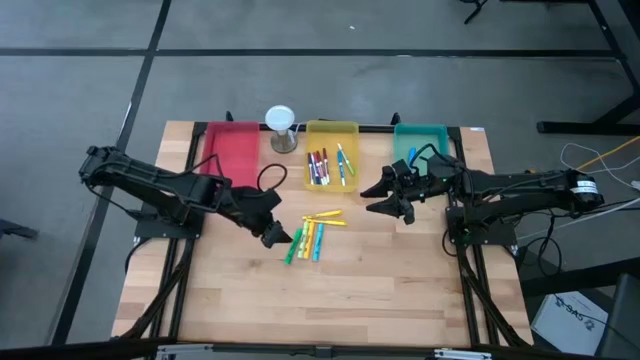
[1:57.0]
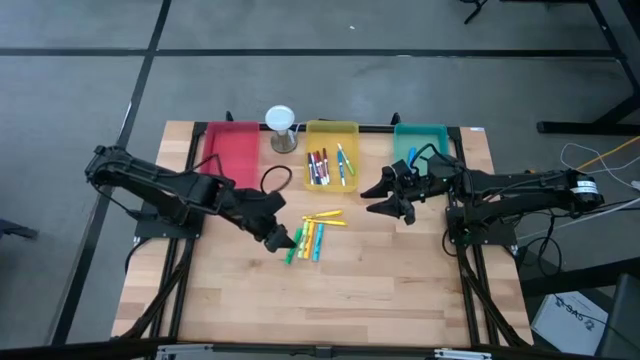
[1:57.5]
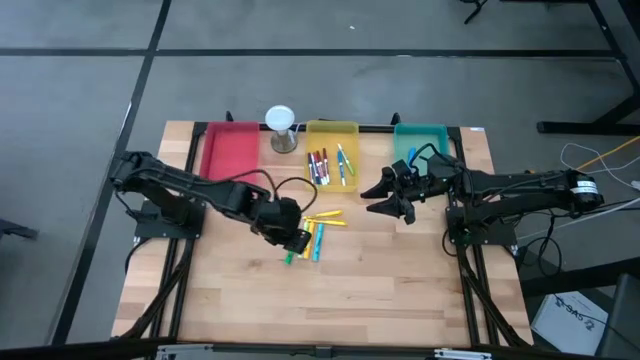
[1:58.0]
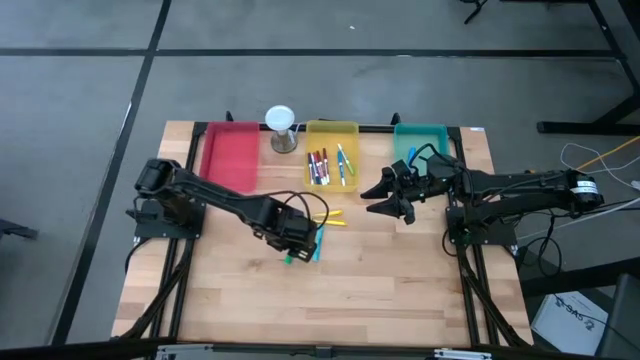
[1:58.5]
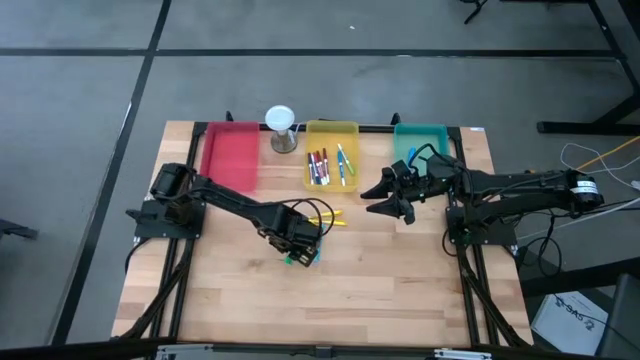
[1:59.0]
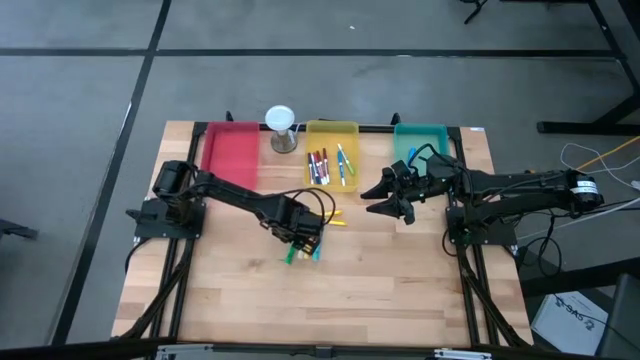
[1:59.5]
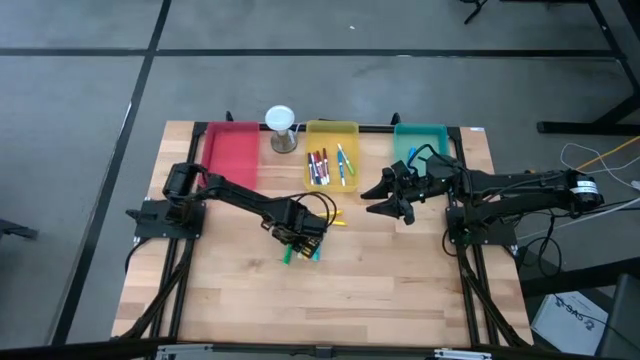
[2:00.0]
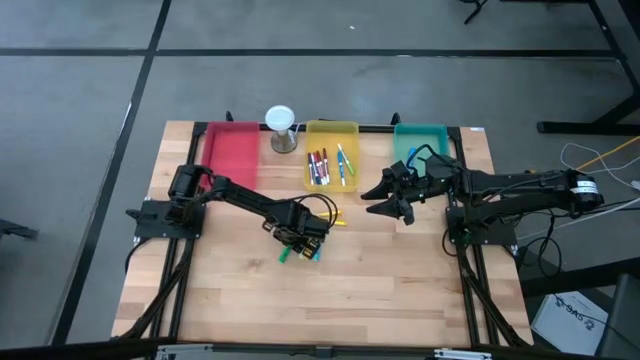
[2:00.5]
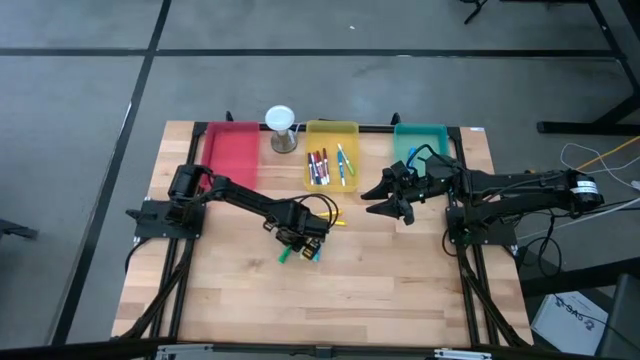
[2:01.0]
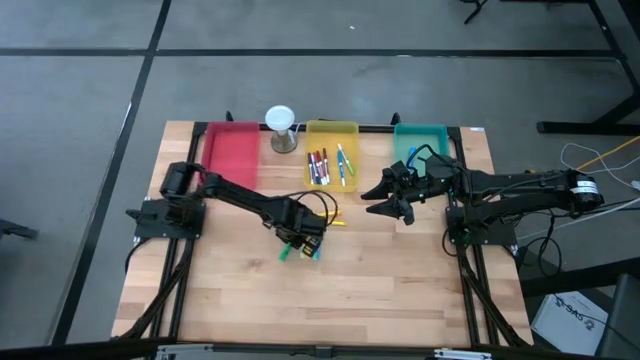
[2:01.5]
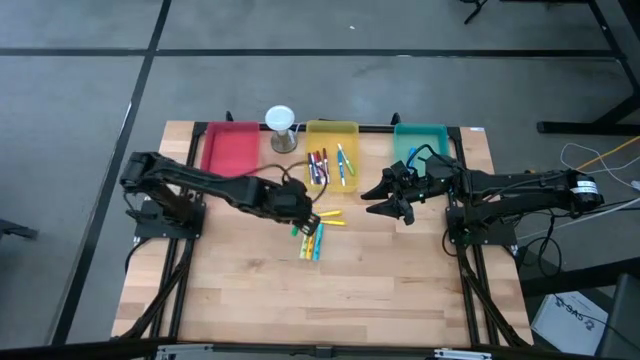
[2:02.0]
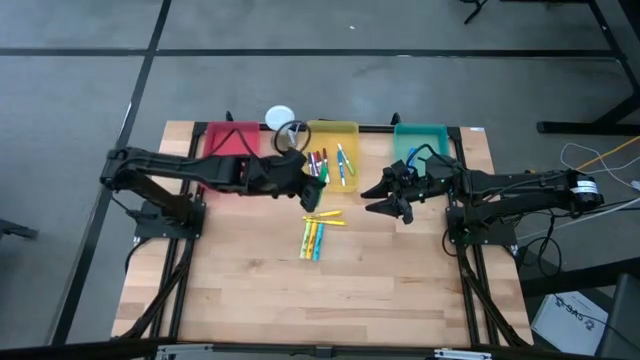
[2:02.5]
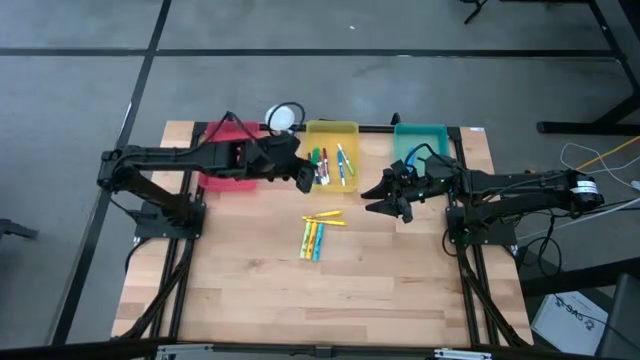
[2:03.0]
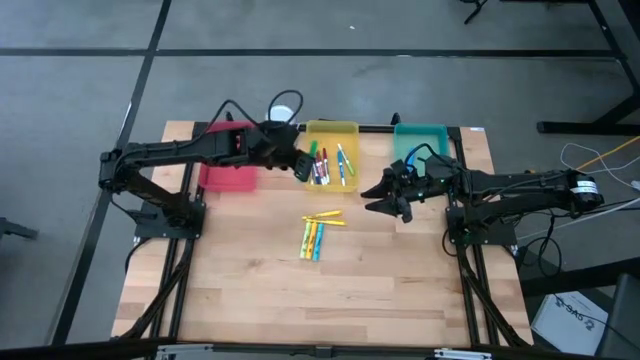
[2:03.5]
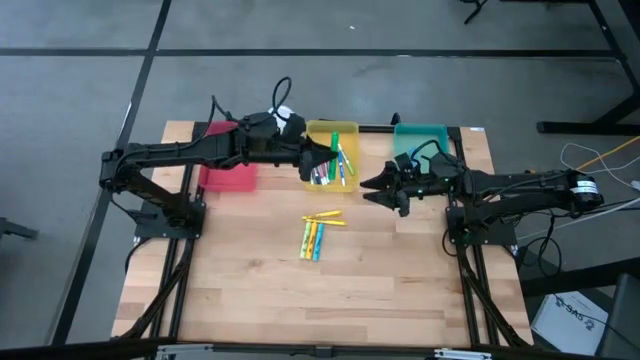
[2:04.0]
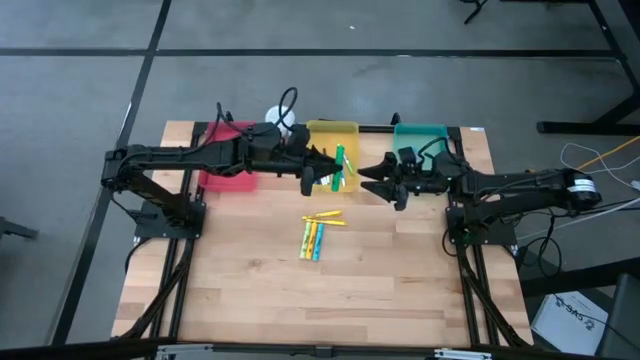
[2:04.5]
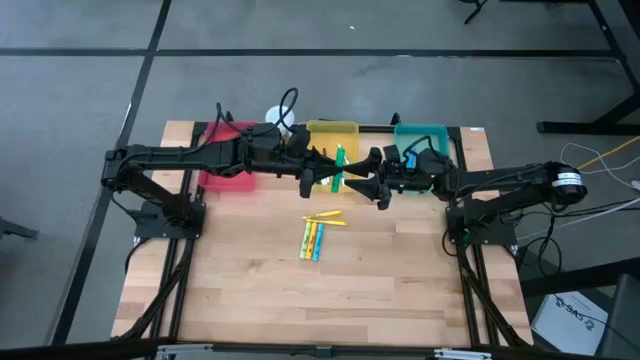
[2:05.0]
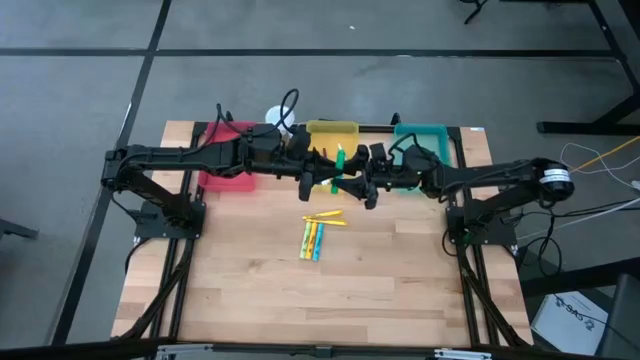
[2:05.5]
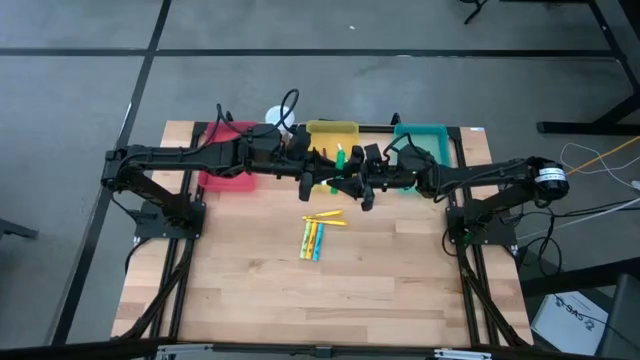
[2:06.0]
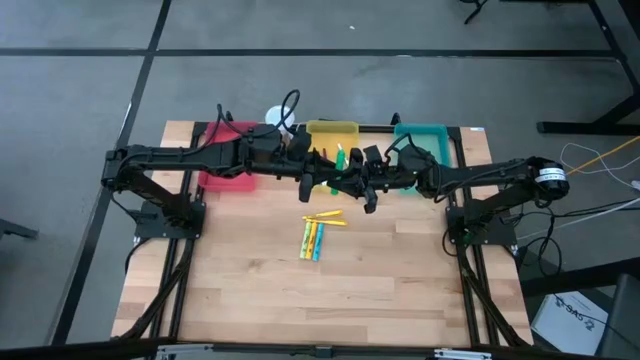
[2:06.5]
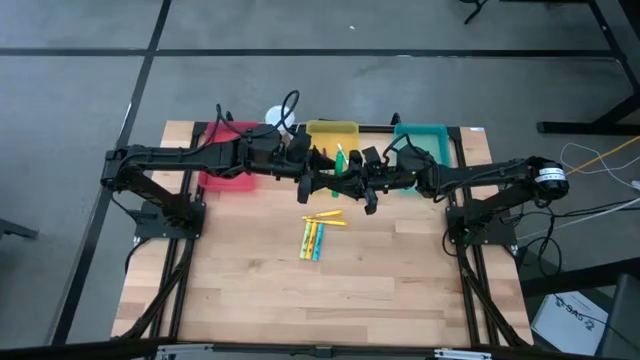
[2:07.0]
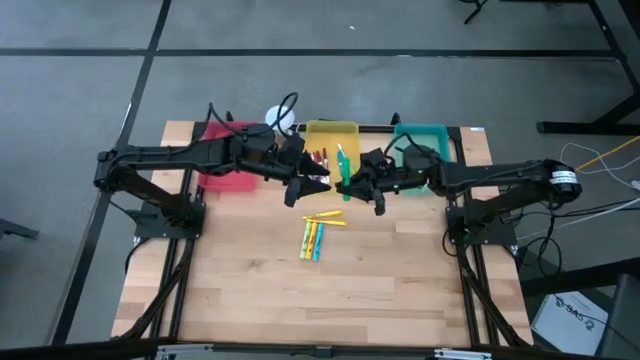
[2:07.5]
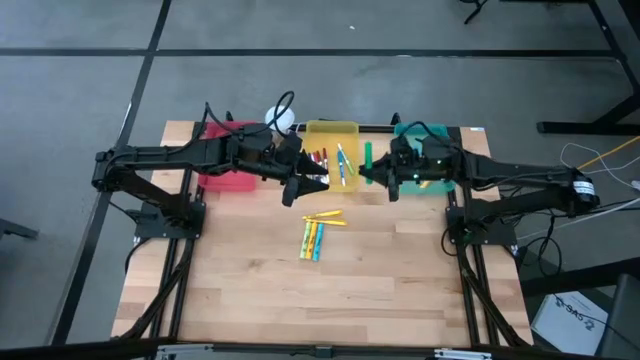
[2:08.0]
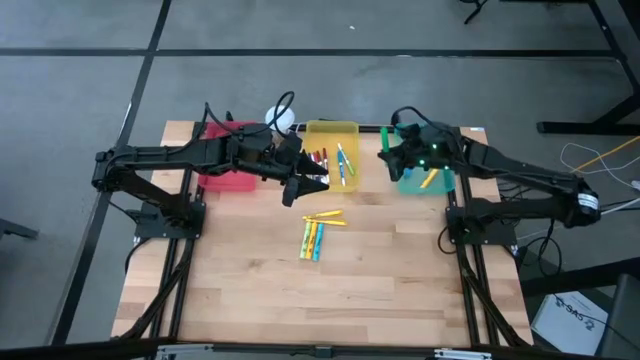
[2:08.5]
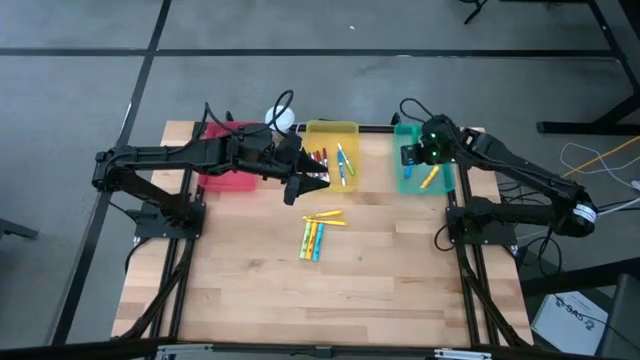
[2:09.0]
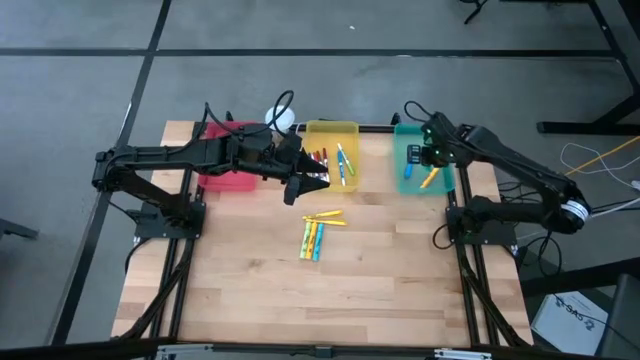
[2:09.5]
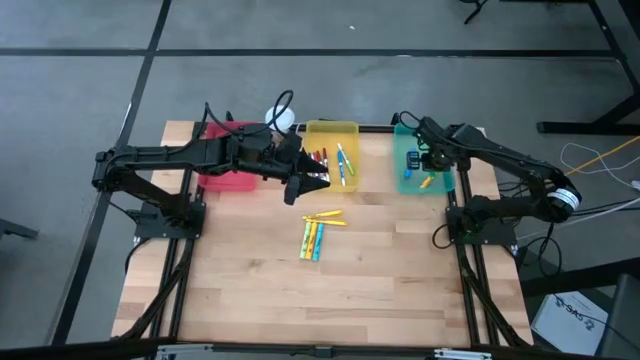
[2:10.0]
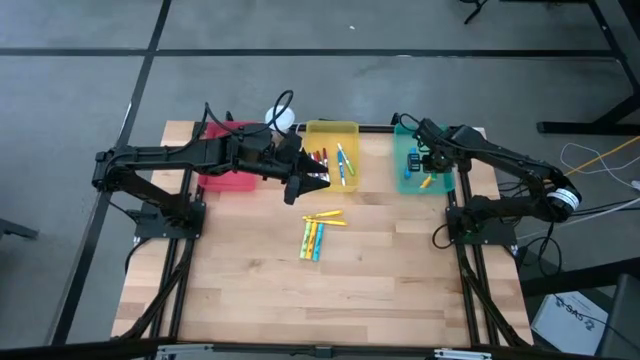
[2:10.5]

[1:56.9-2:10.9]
Task: Pick & Place Markers
Put the green highlighter into the blue bin

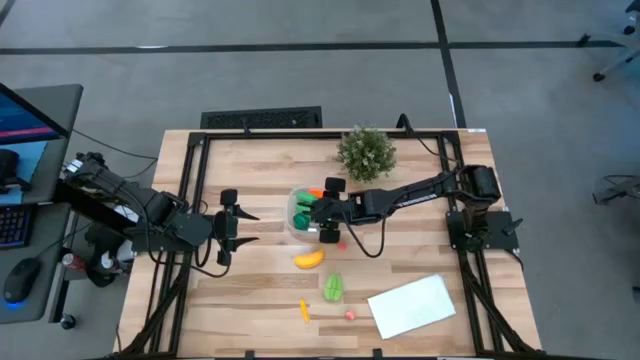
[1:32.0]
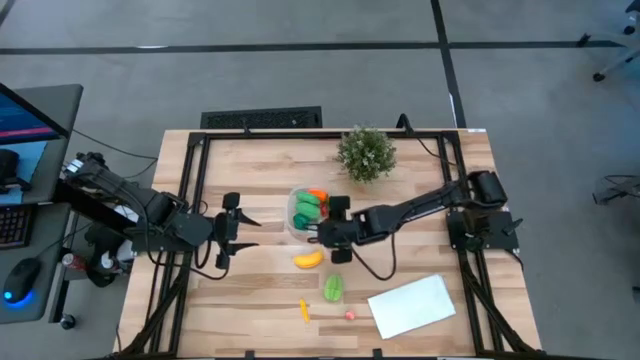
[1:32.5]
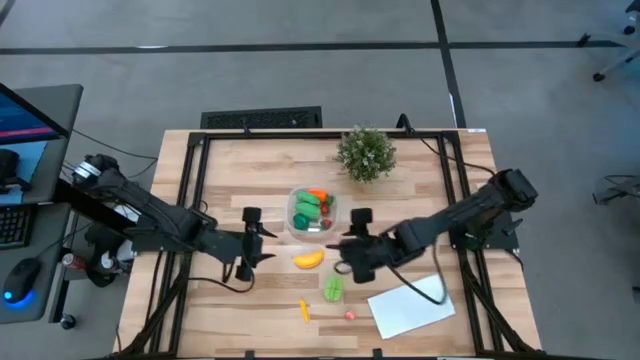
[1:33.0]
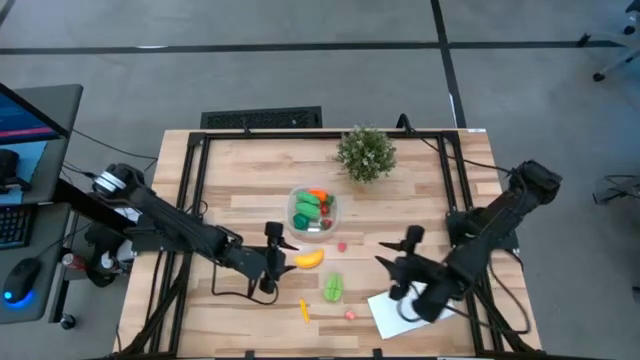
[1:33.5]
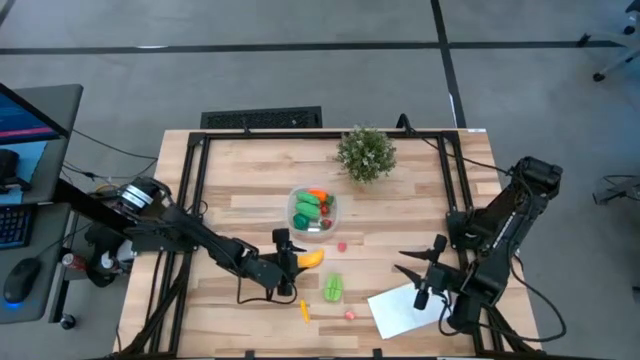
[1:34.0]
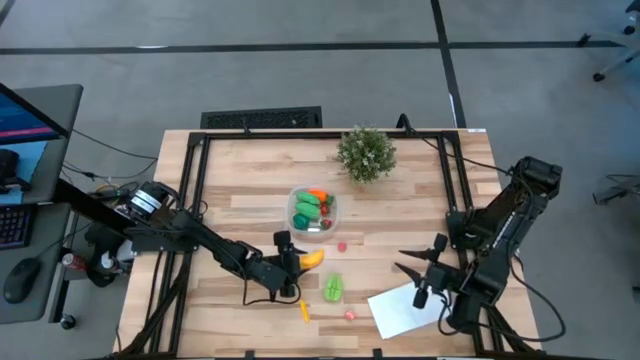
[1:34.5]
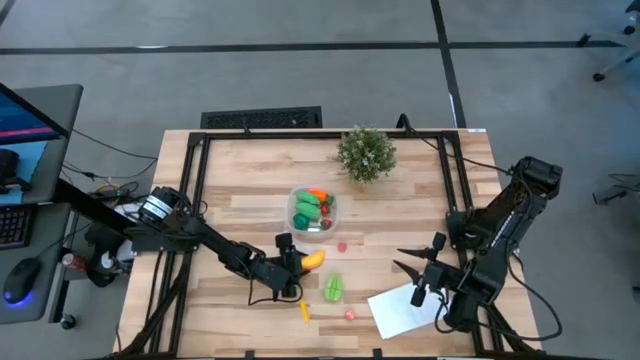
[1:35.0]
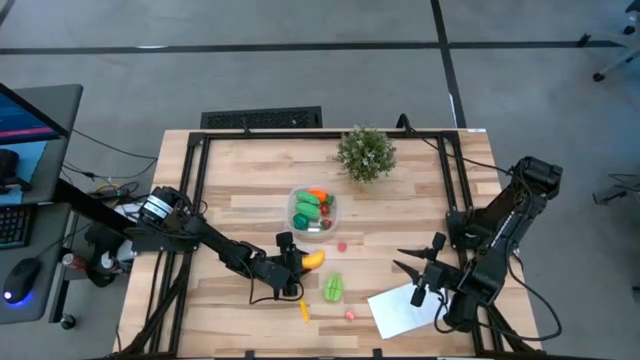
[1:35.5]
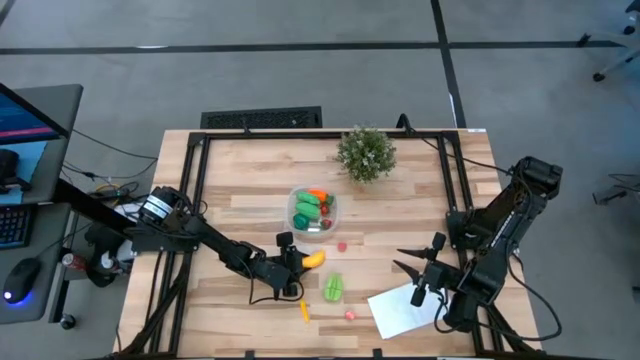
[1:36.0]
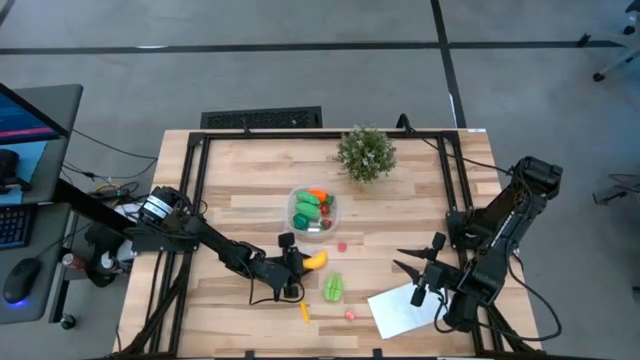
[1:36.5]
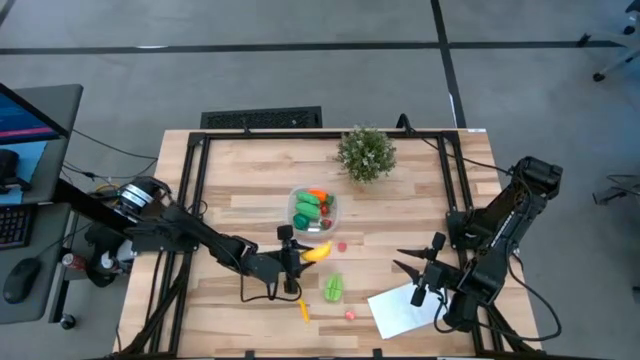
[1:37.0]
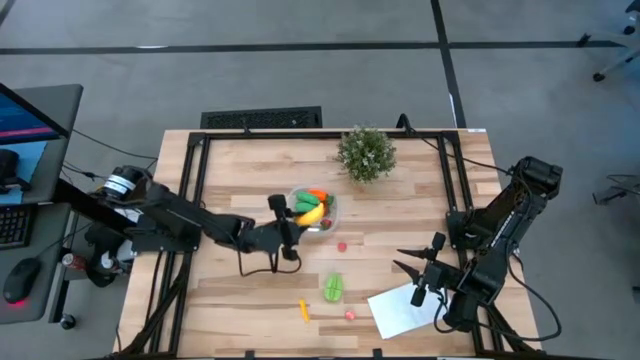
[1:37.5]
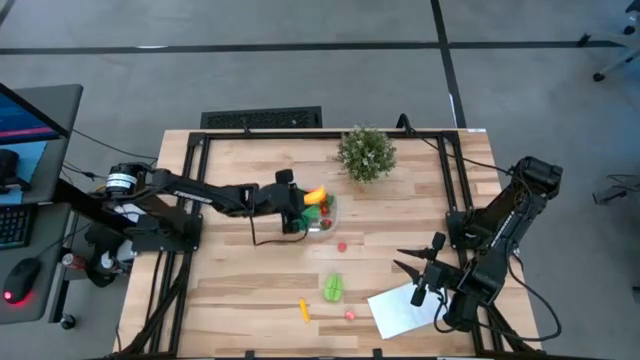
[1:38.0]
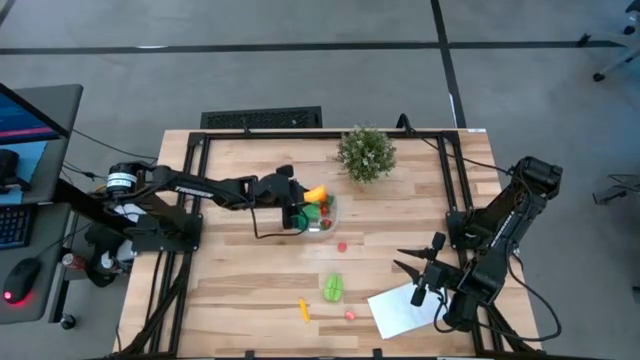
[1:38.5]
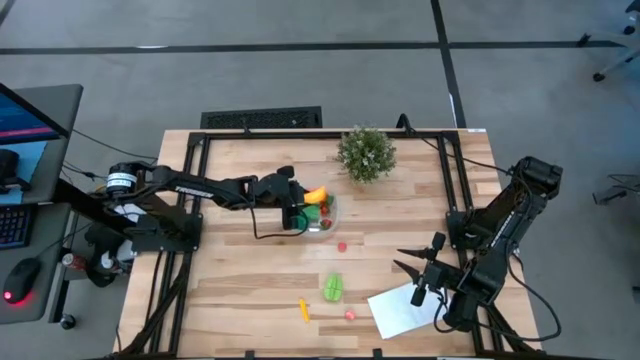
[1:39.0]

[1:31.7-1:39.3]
Task: Pick and placing Produce into tupperware
Put the yellow banana into the transparent container
